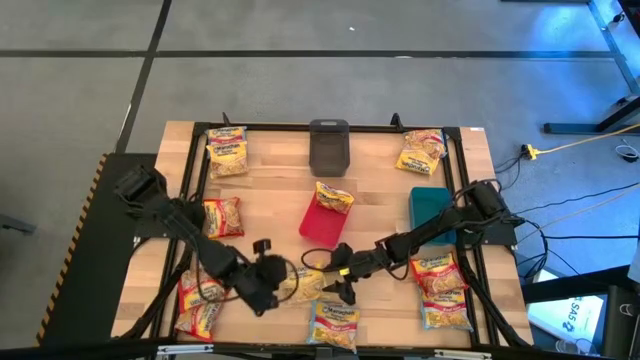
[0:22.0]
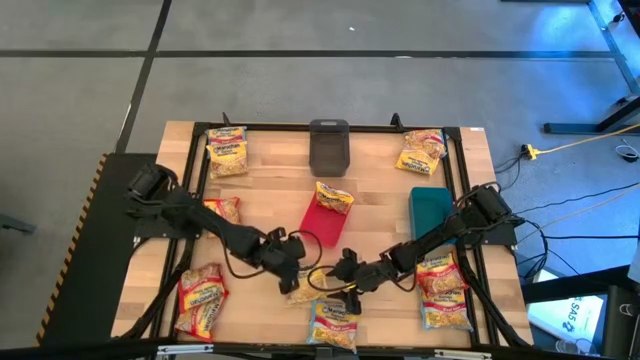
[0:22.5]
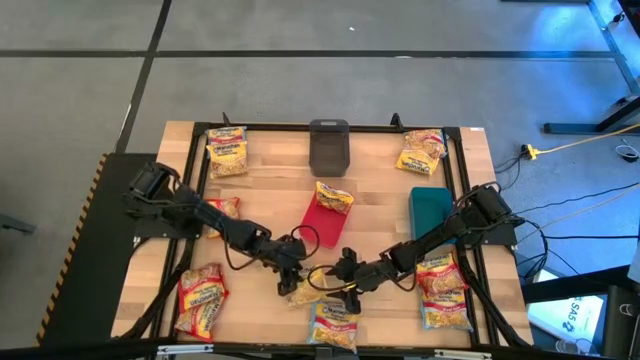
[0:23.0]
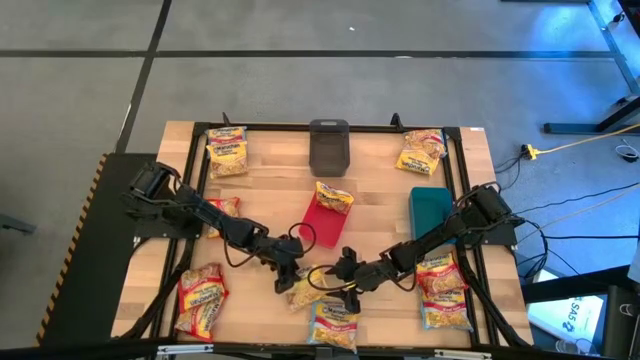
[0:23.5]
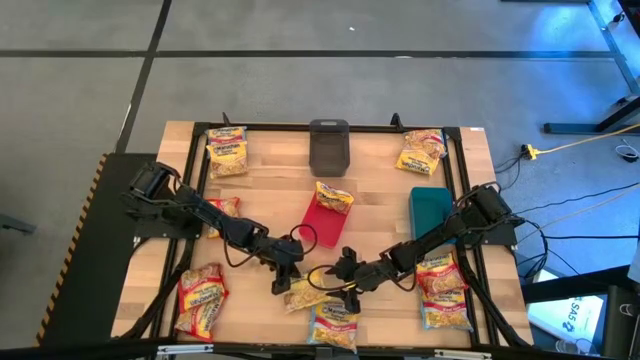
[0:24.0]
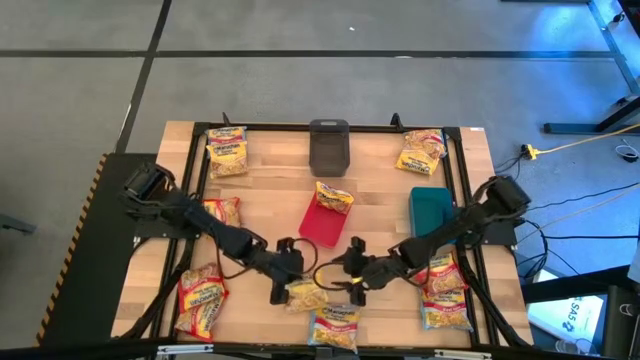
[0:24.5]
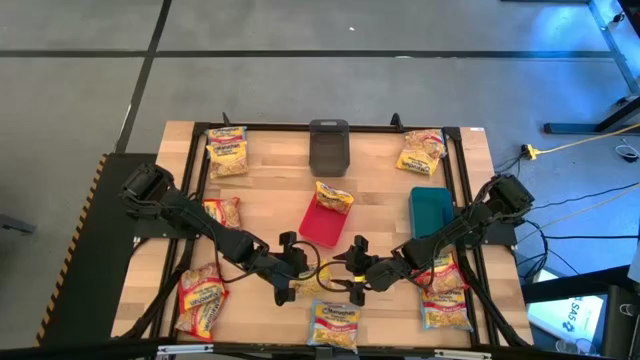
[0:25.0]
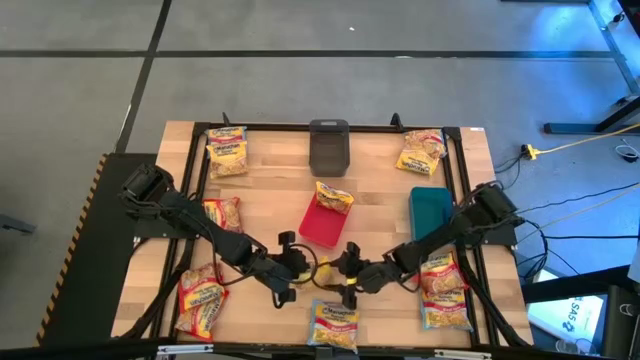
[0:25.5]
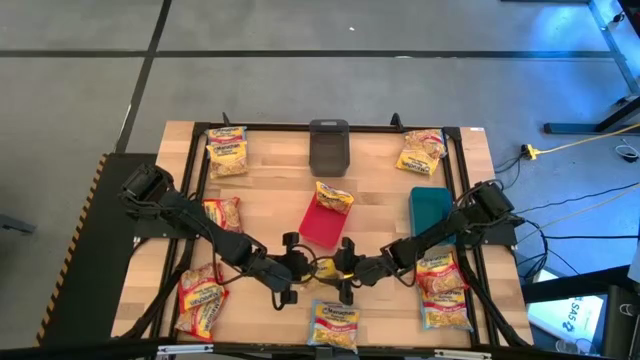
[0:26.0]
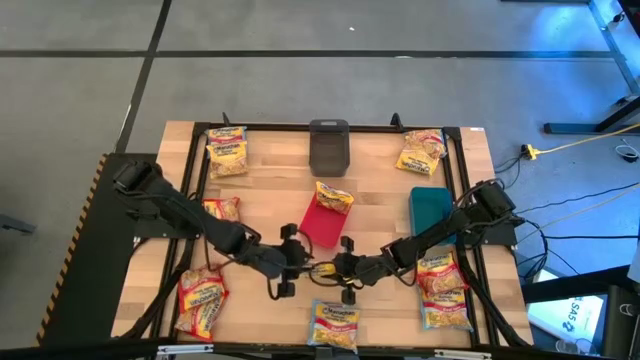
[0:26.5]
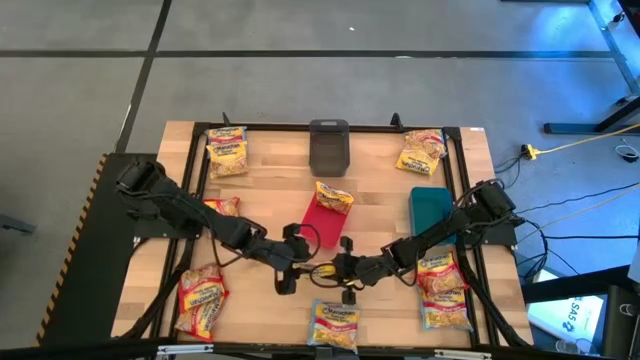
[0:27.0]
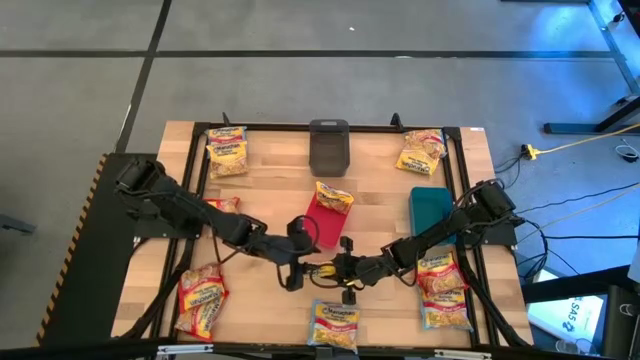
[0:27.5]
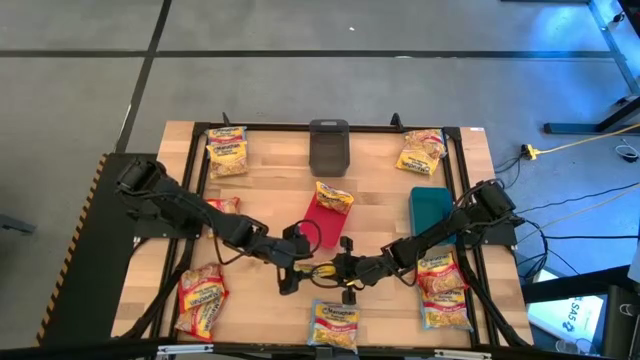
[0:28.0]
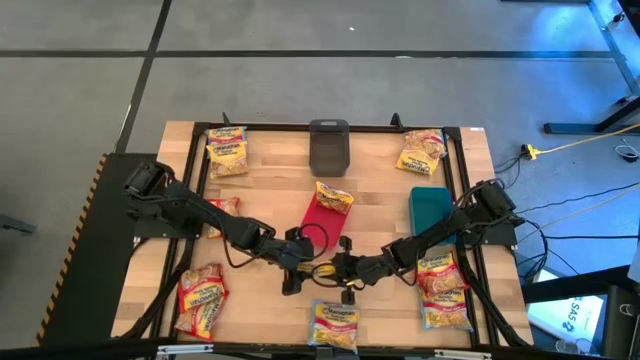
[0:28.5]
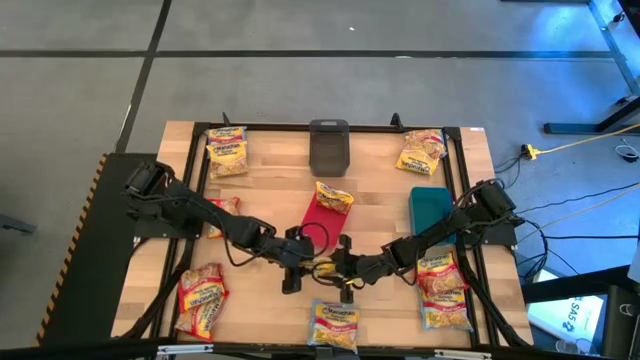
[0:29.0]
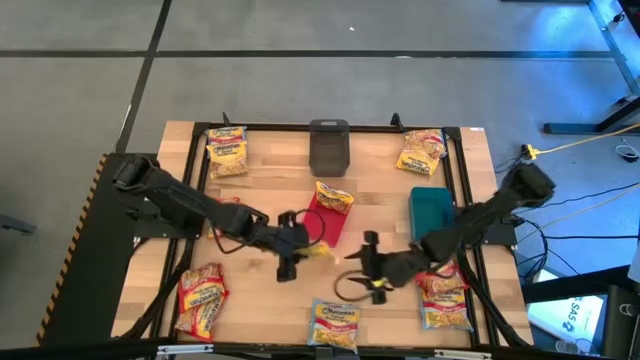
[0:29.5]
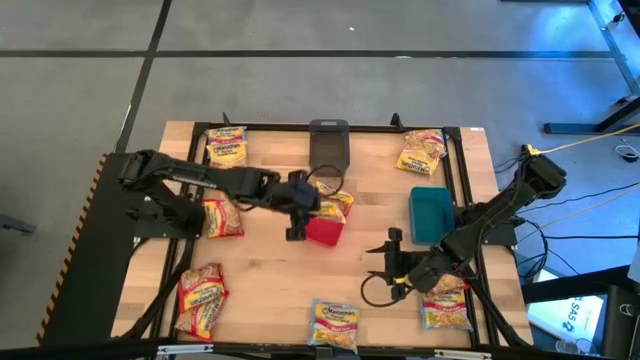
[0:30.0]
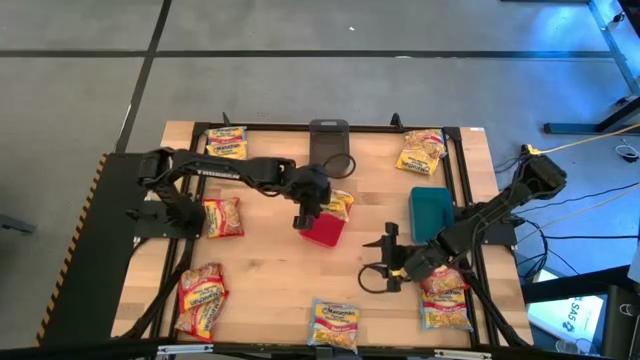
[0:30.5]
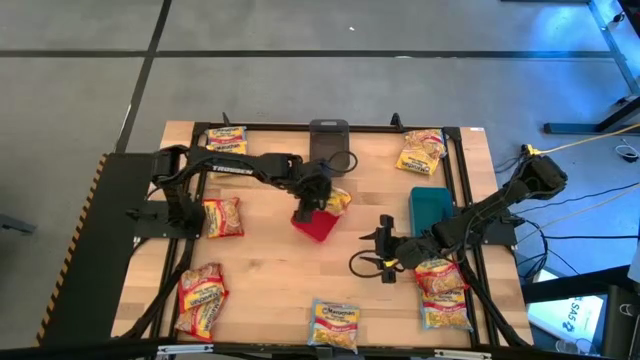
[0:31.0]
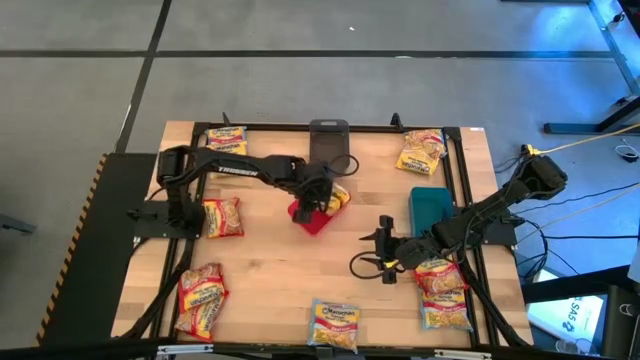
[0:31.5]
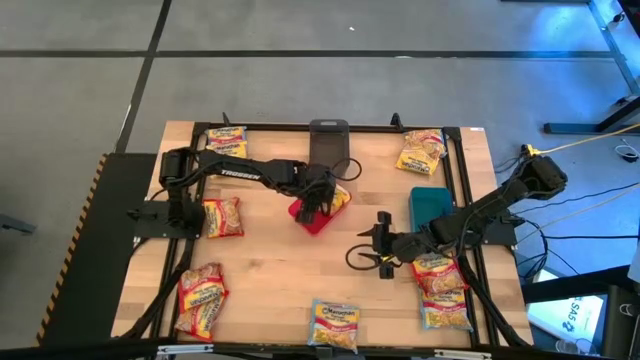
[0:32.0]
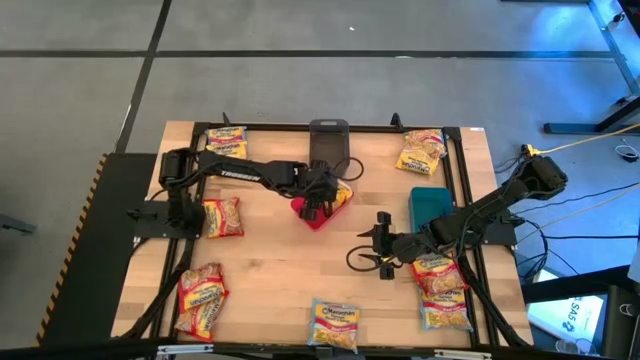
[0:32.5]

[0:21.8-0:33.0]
Task: Sort Maruchan noodles
Put the yellow noodle pack into the red bin

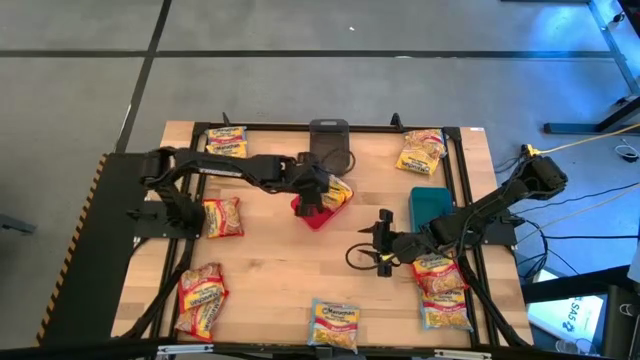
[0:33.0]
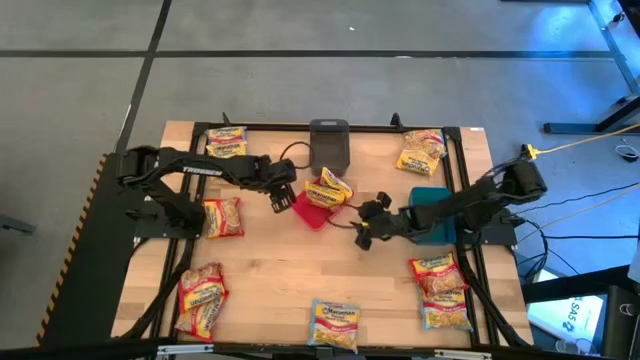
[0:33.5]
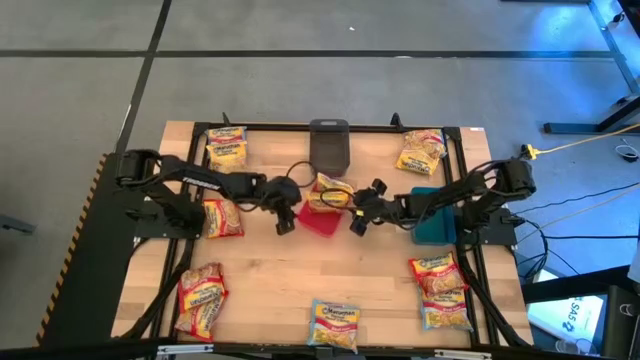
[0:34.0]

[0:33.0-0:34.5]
Adjust the red bin

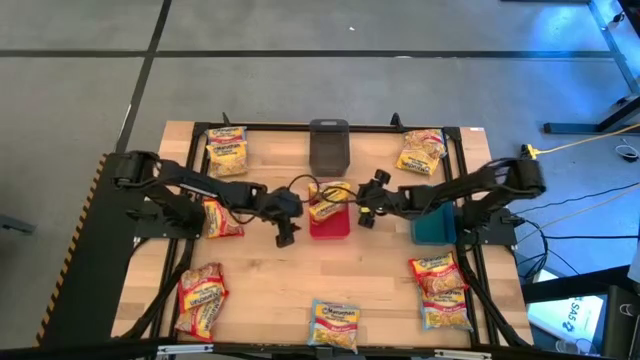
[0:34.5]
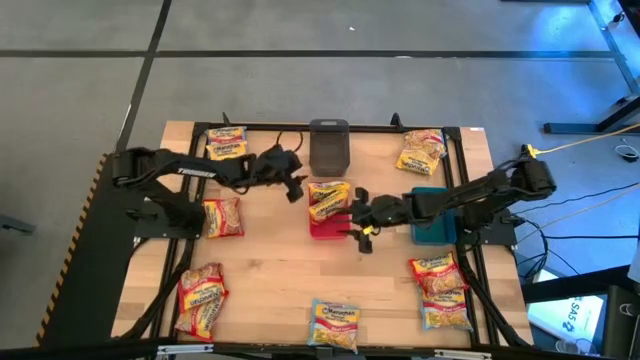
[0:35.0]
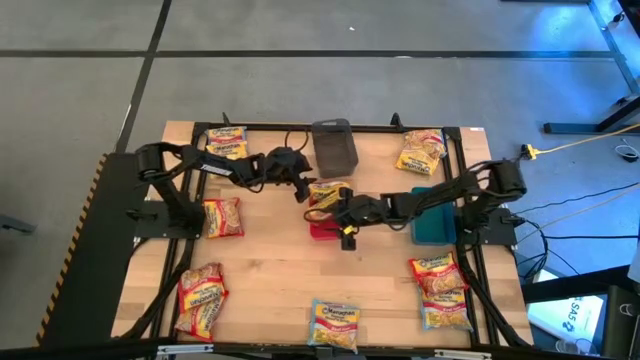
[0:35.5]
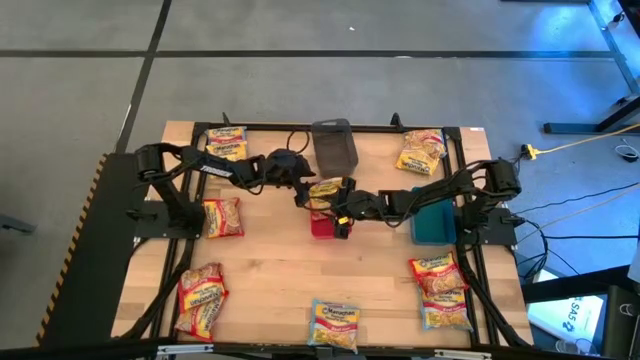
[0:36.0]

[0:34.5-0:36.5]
Adjust the yellow noodle packs in the red bin

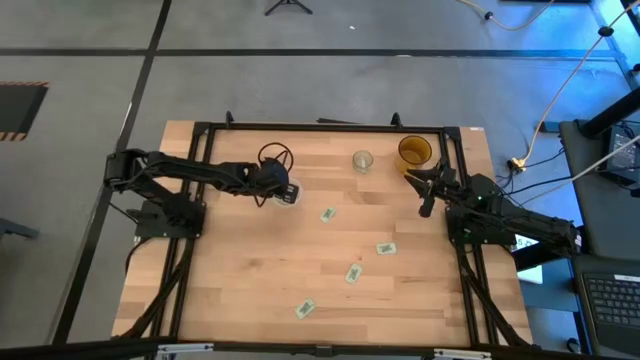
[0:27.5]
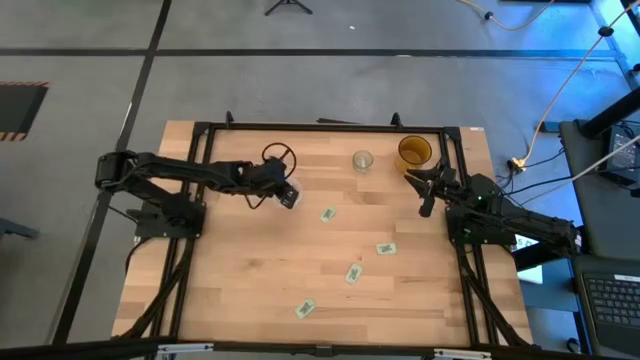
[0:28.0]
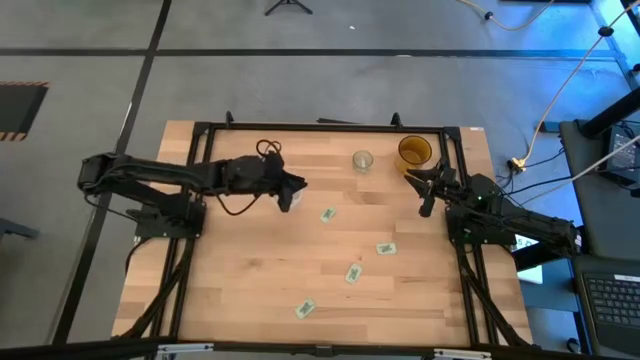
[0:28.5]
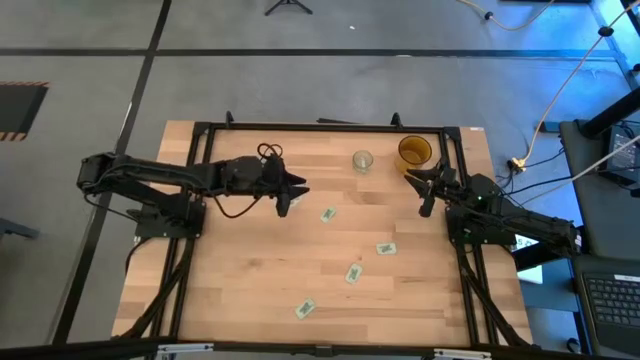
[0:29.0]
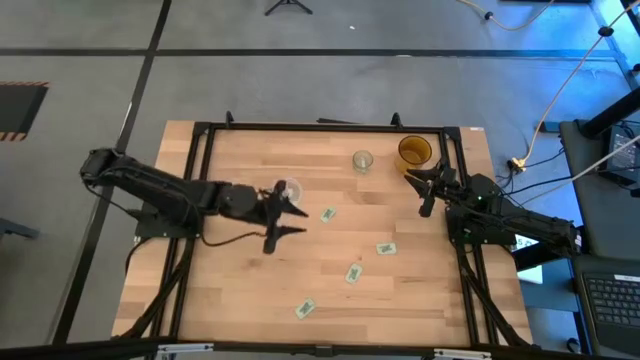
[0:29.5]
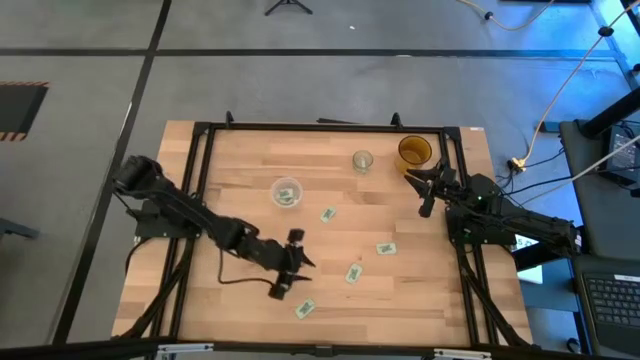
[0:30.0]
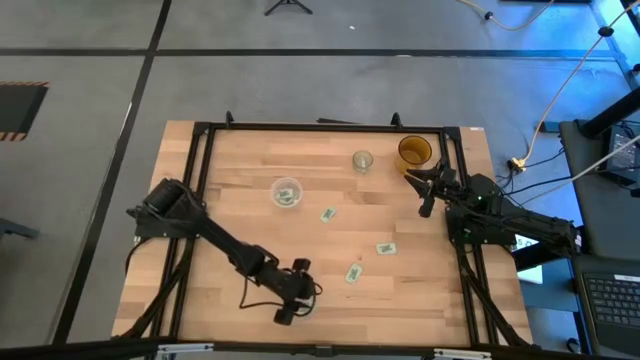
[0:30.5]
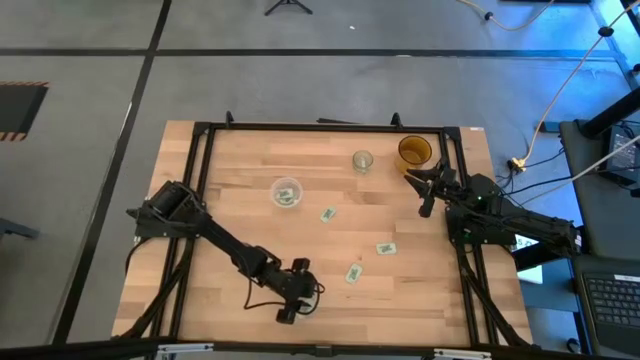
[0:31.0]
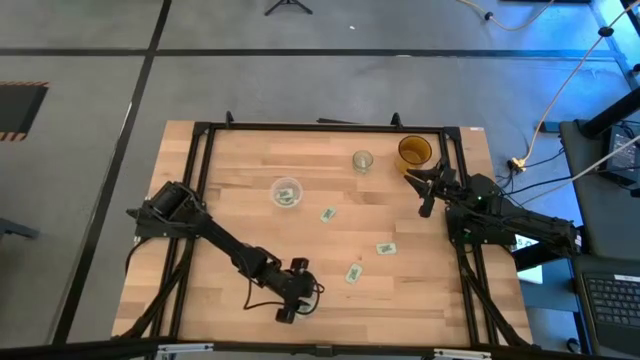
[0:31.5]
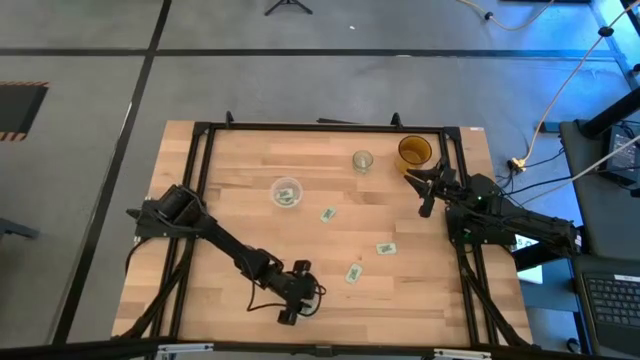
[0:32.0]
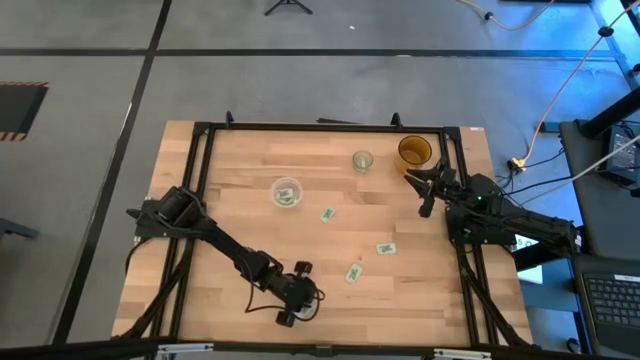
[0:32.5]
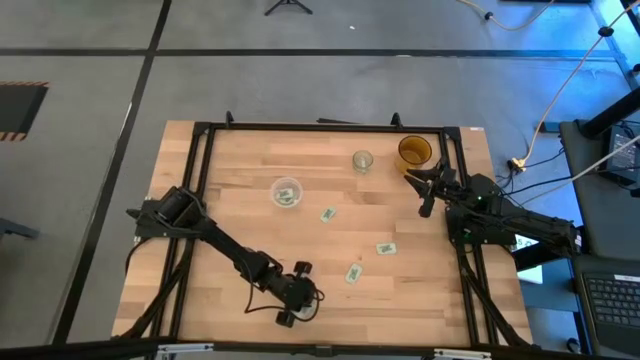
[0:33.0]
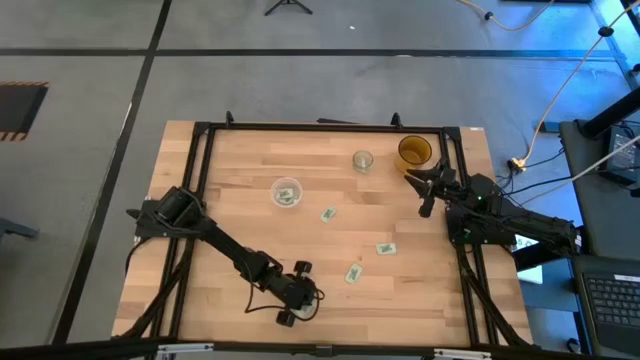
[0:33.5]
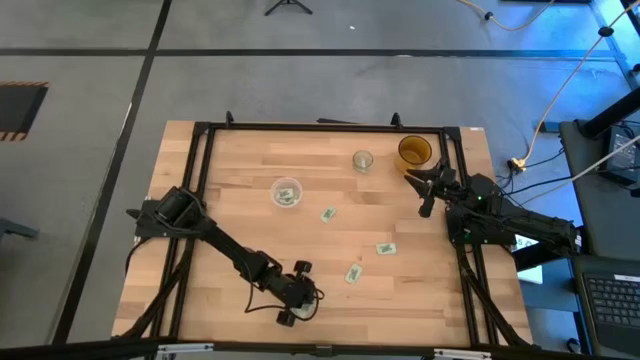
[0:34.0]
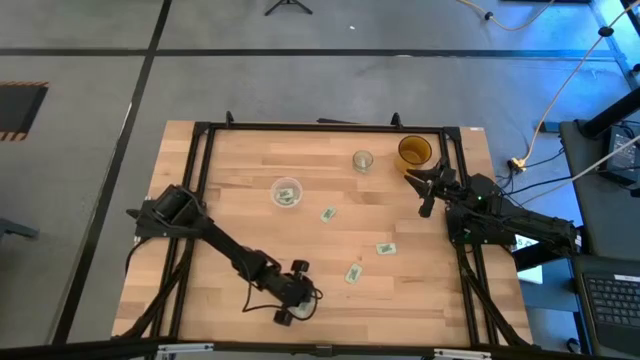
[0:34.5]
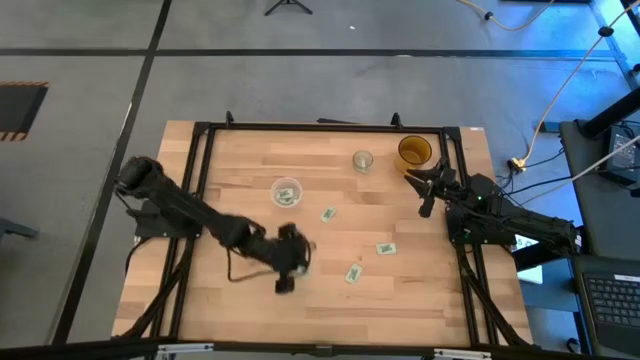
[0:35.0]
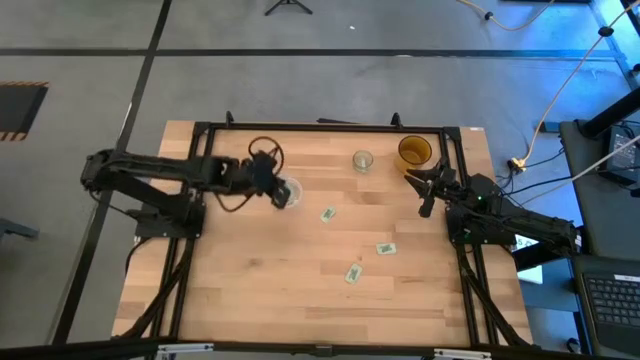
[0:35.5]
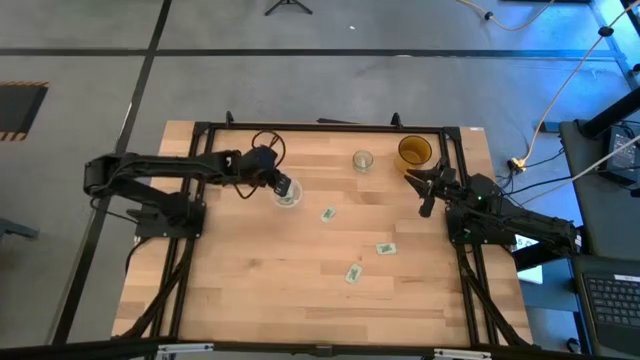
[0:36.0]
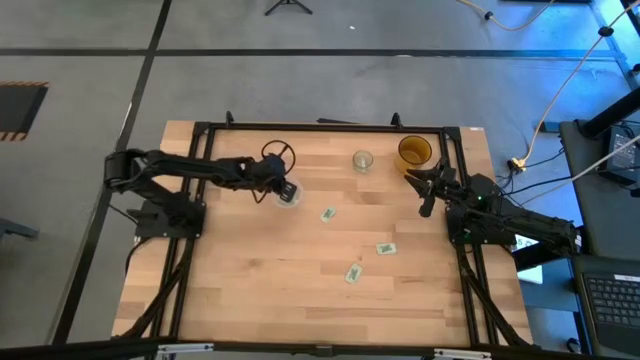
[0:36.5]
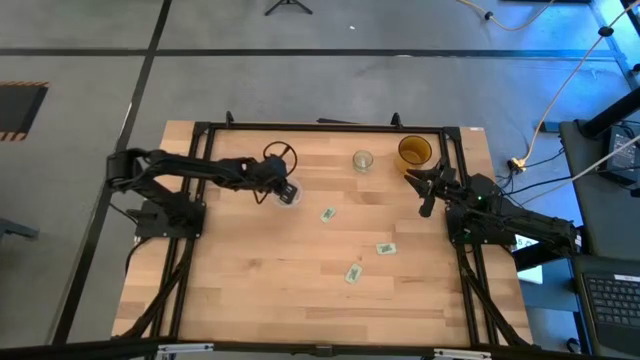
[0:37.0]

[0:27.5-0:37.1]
Task: Pick and place Stevia / Truvia into bins
Put the stevia packet into the transparent container
